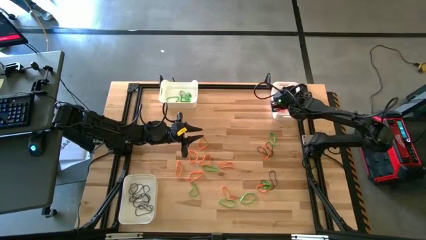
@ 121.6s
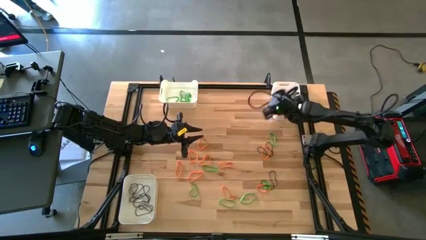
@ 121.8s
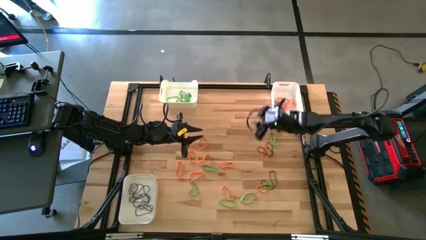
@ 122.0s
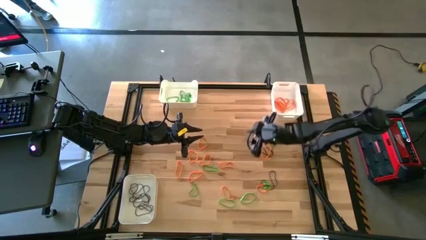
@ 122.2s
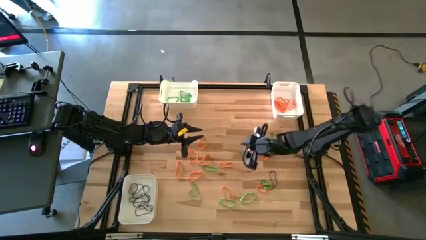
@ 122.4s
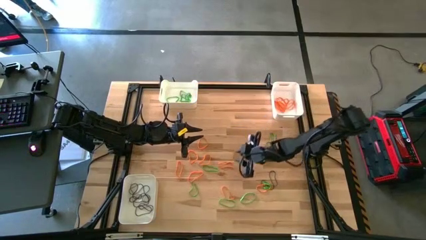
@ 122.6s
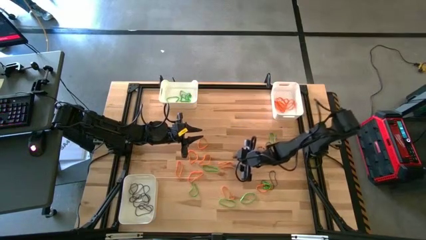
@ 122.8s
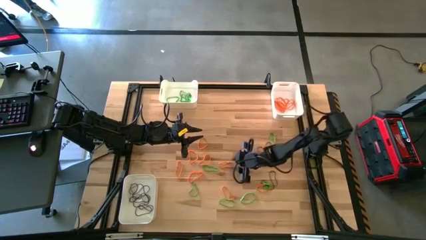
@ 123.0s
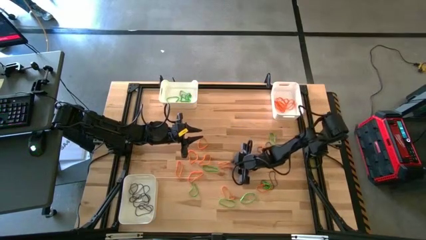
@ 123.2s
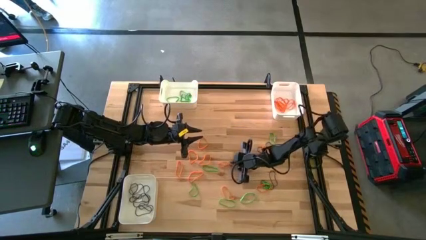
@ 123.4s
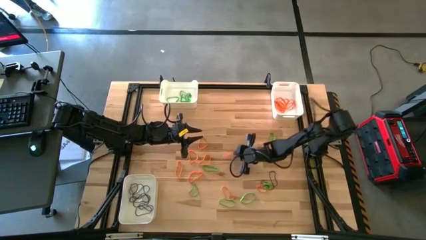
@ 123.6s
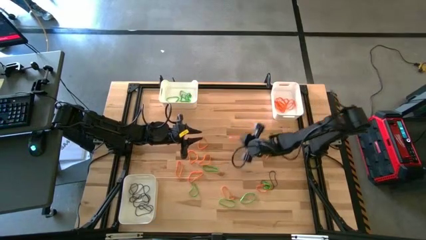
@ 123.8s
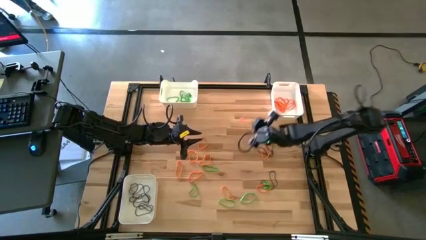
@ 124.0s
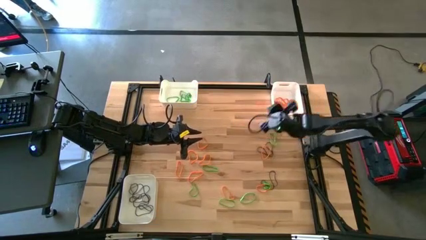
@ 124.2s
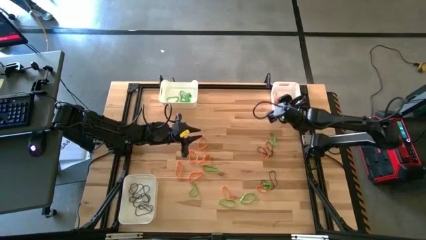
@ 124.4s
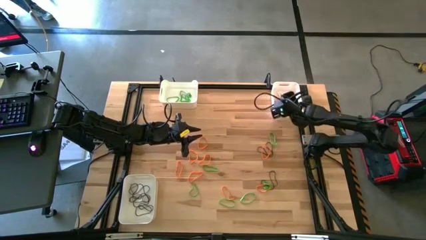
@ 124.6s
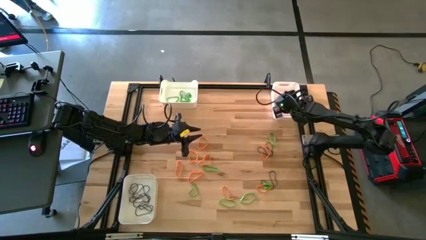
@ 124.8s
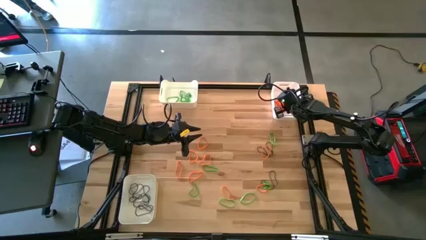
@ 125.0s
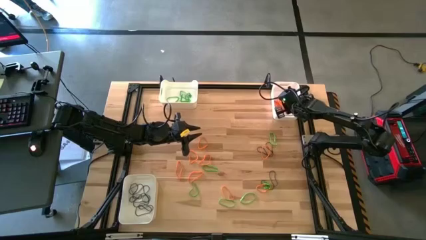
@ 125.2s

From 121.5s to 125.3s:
Task: Sort rubber bands into baskets
Put the orange rubber band into the top right white bin

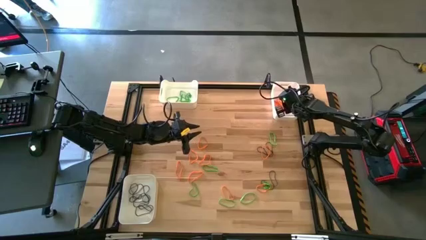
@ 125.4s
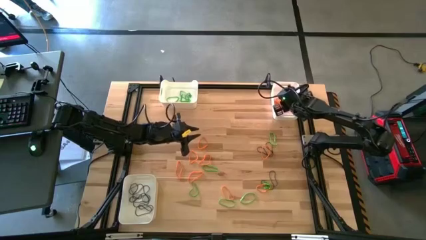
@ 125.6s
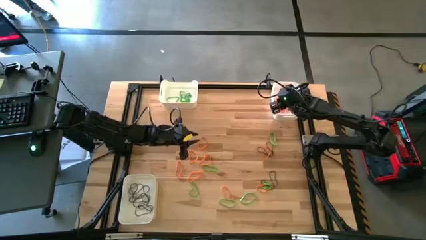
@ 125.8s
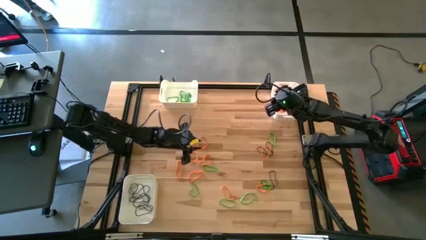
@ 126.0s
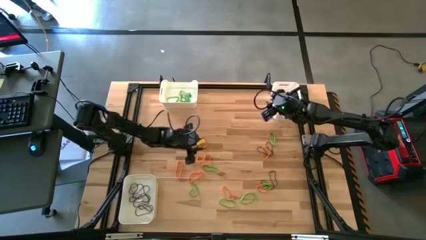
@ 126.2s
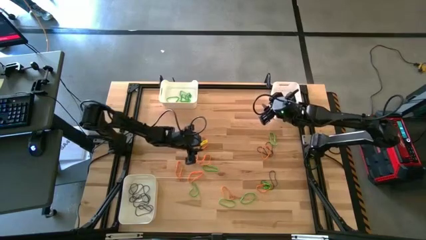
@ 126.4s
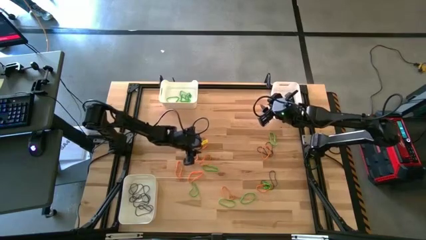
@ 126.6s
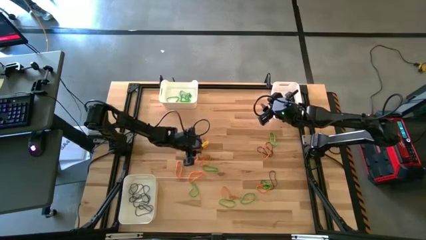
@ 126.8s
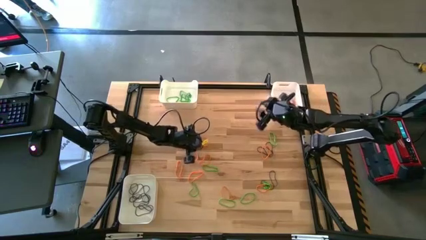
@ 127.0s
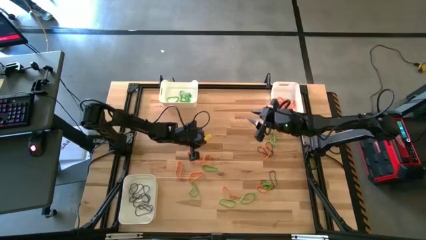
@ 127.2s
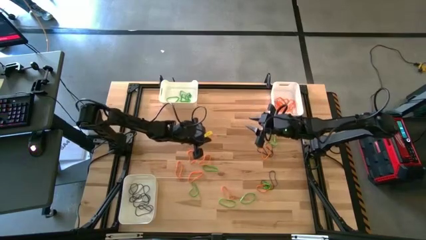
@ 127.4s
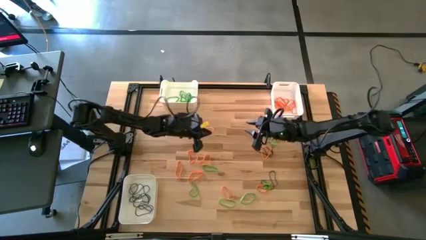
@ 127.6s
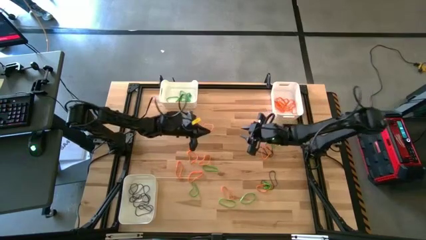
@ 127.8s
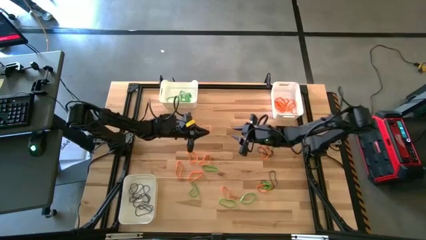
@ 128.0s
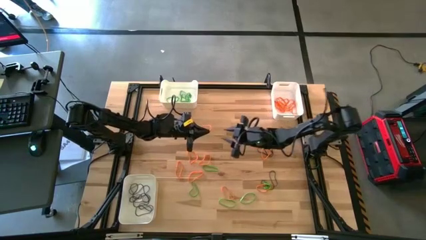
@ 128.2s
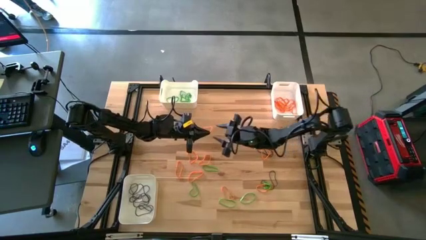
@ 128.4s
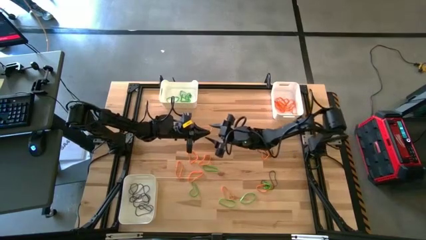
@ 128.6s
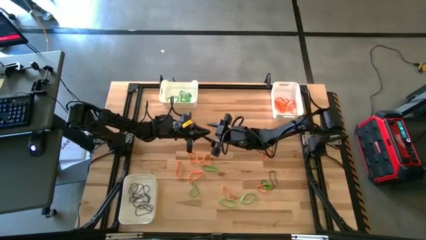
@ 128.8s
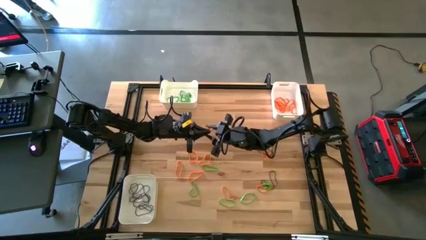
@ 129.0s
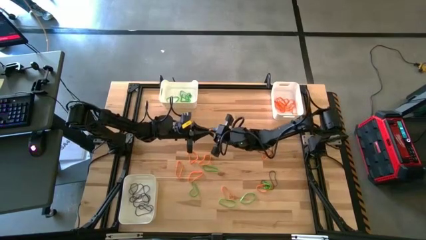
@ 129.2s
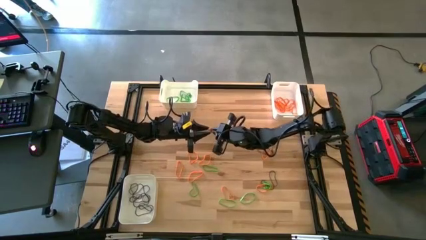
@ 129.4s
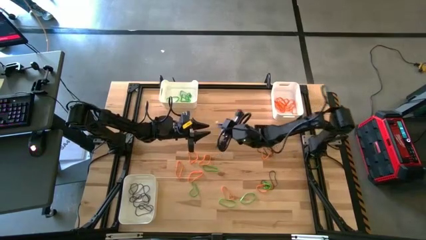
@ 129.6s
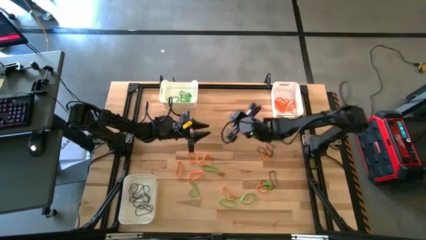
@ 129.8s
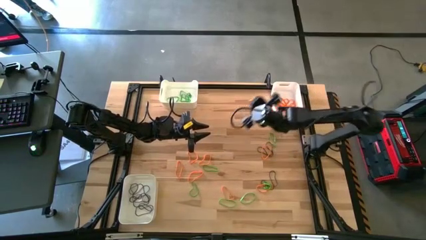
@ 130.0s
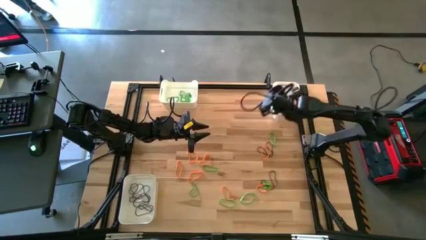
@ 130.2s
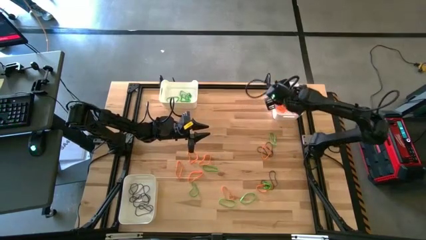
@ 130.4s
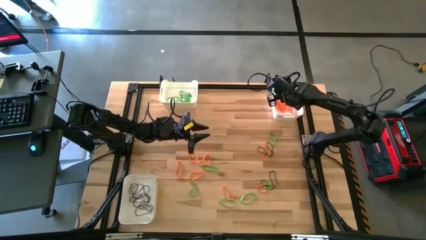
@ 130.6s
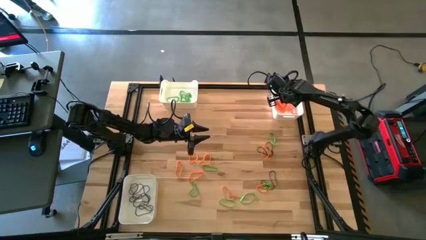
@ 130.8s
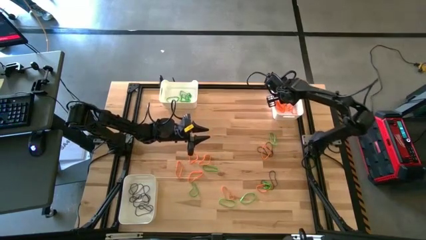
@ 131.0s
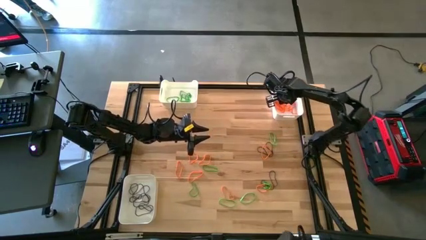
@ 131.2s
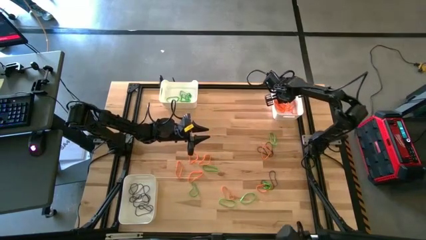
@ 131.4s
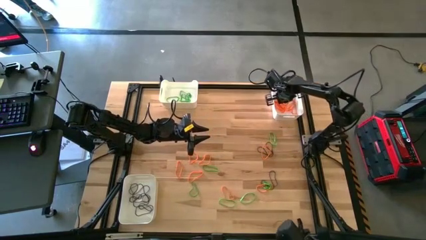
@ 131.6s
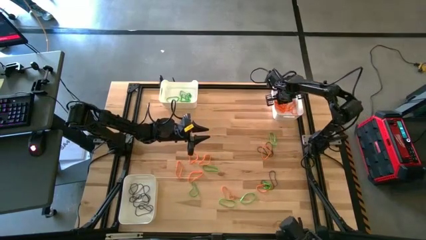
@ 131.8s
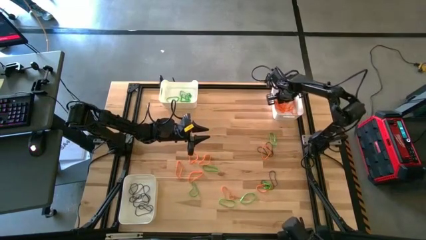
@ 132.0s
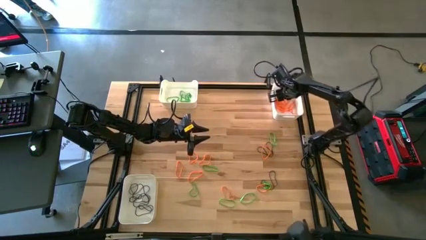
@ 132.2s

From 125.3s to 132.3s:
Put the orange rubber band into the top right white bin

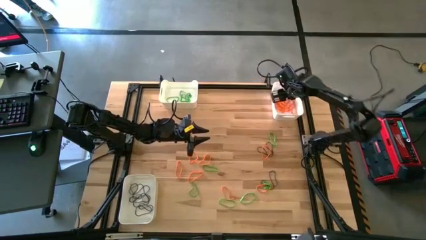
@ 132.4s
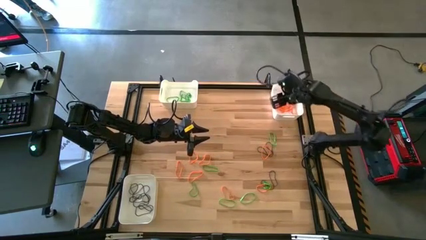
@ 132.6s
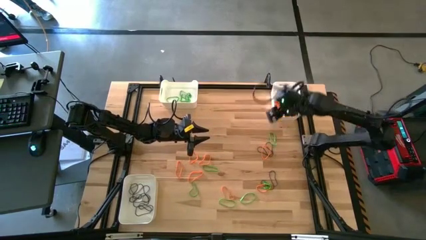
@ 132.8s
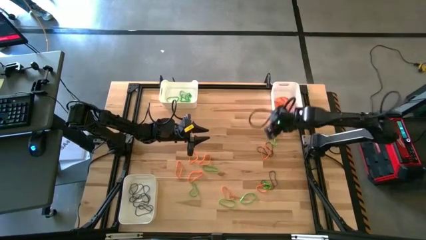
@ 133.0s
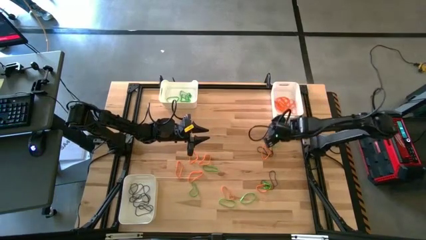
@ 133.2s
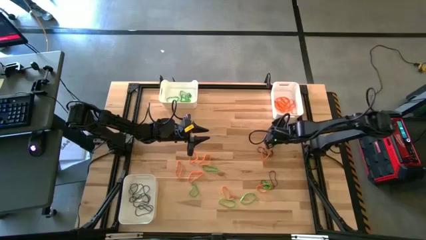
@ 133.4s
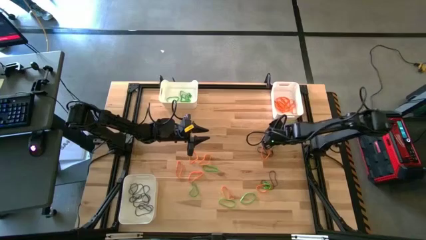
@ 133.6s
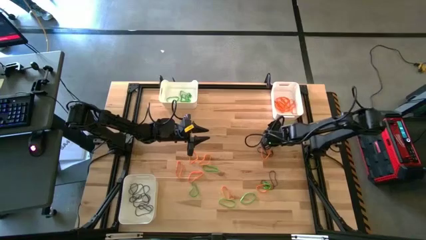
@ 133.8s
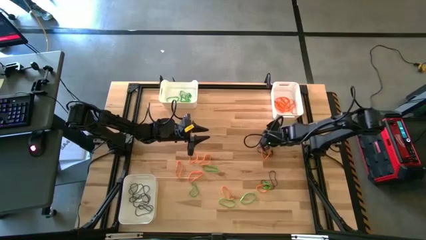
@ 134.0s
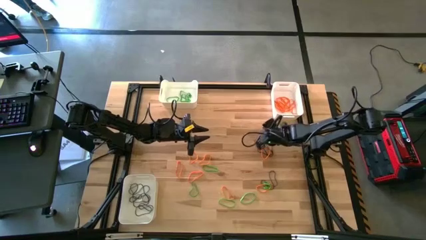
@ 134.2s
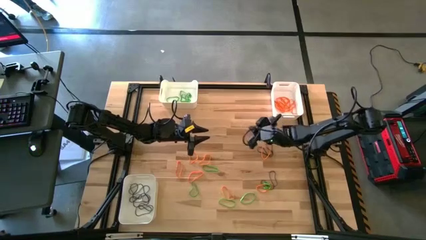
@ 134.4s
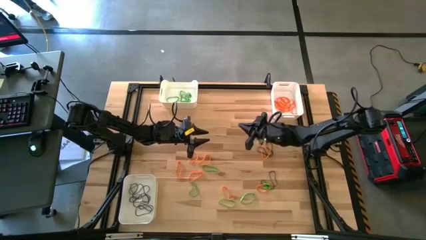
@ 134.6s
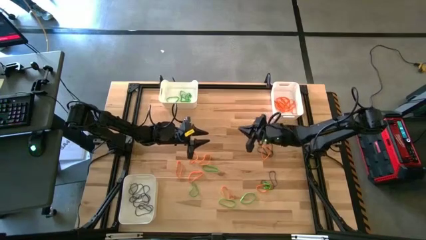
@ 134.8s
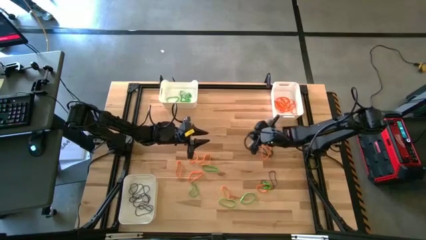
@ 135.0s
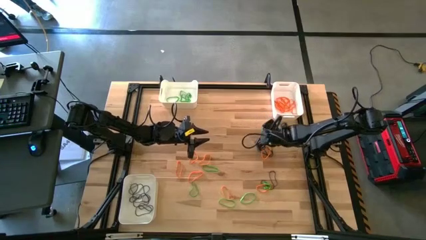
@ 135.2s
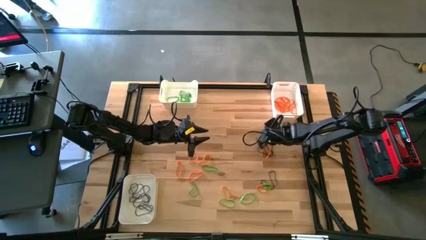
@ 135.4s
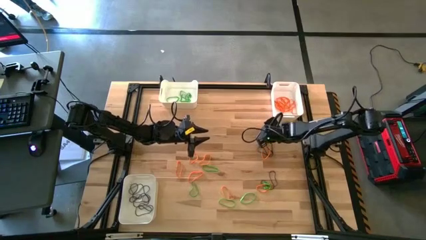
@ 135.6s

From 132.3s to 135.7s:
Put the green rubber band into the top left white bin

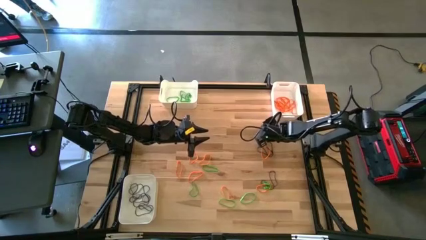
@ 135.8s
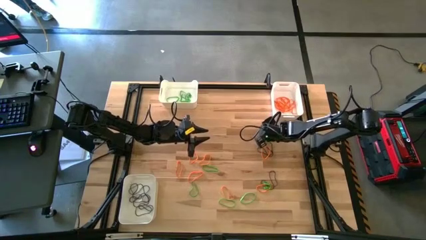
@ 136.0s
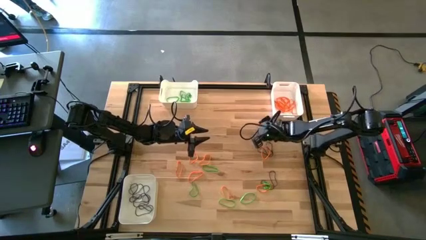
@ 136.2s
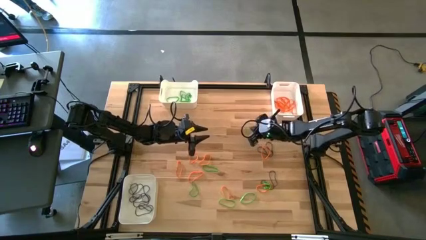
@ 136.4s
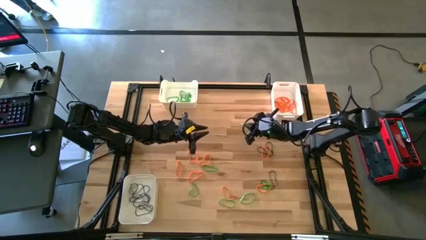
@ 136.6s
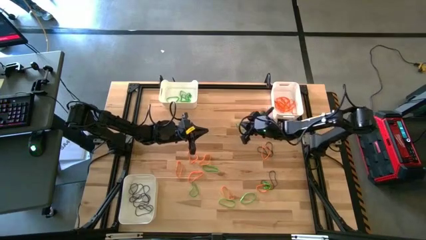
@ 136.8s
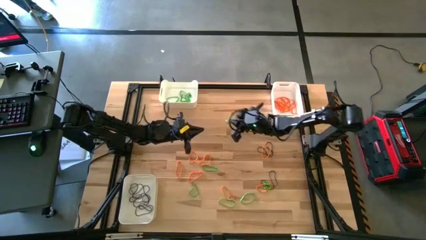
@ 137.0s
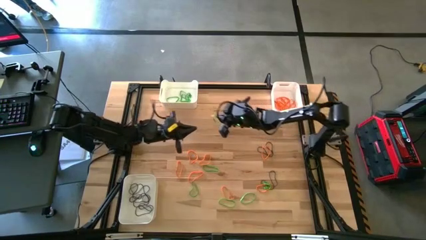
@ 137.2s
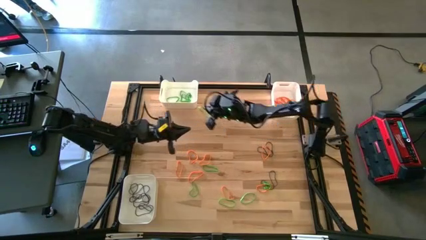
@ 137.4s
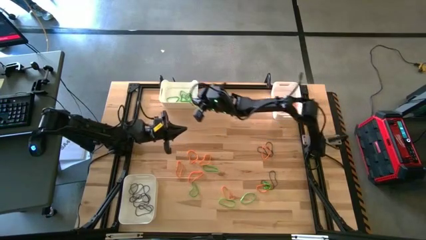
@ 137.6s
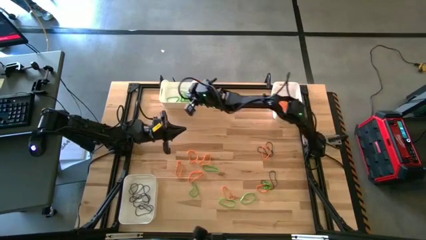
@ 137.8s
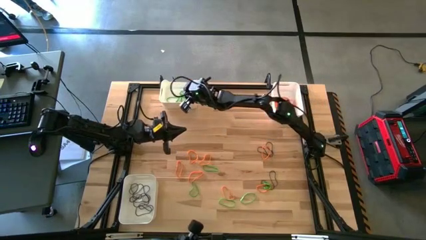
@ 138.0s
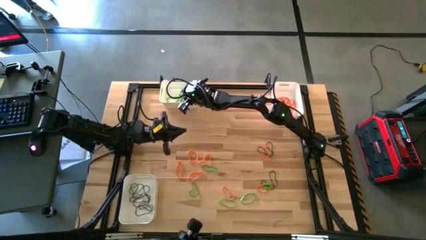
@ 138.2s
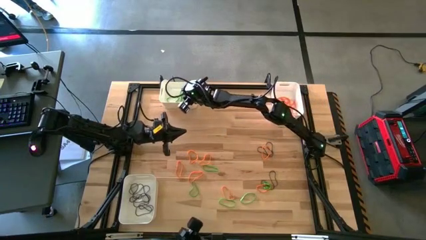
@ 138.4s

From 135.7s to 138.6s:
Put the green rubber band into the top left white bin
